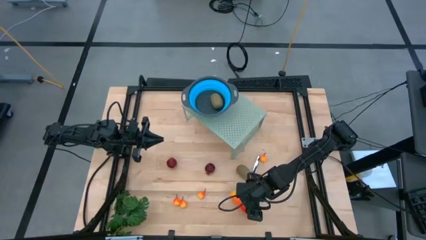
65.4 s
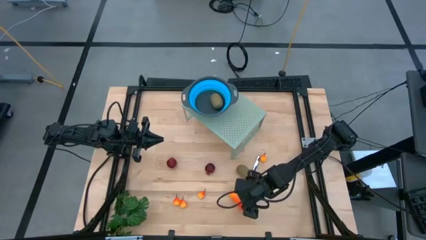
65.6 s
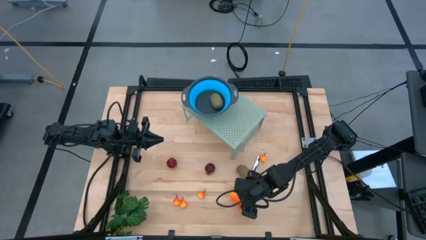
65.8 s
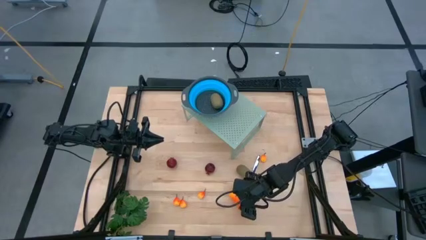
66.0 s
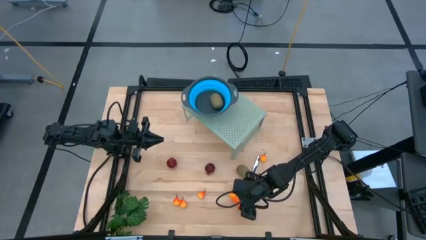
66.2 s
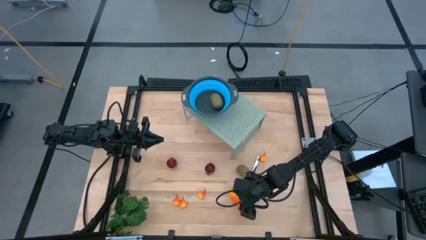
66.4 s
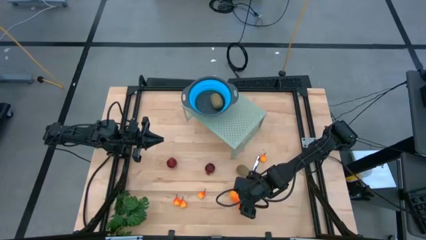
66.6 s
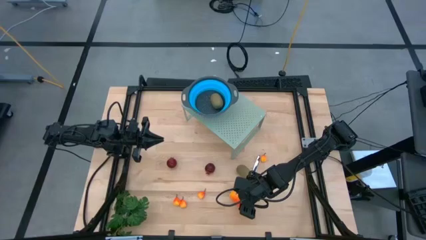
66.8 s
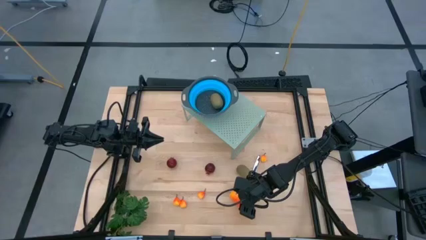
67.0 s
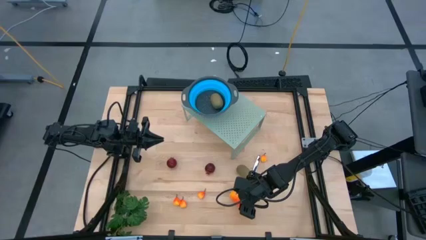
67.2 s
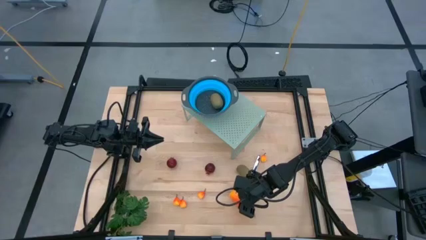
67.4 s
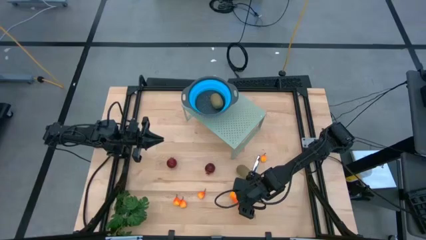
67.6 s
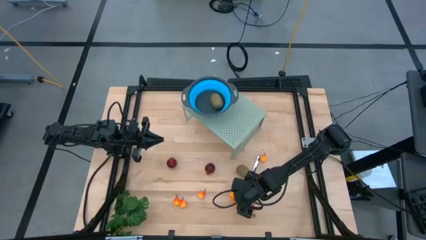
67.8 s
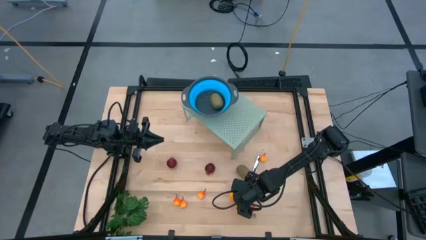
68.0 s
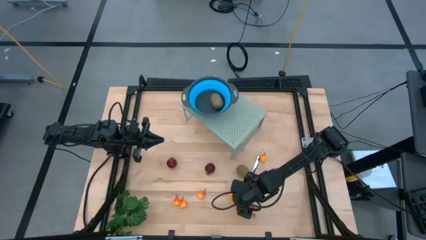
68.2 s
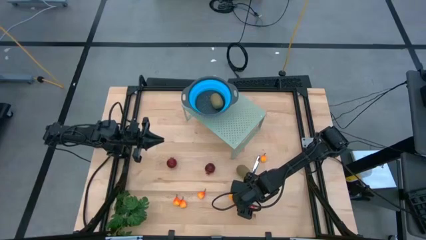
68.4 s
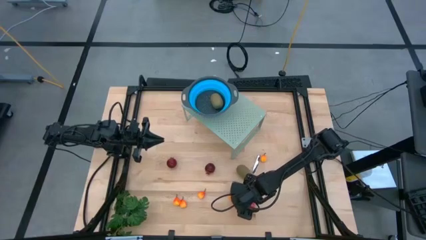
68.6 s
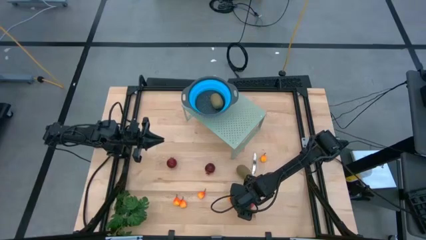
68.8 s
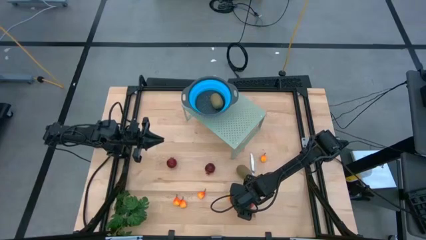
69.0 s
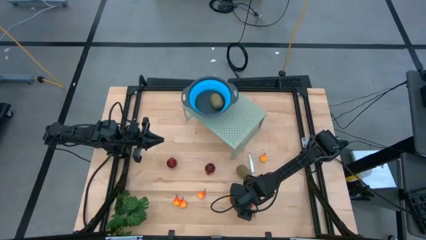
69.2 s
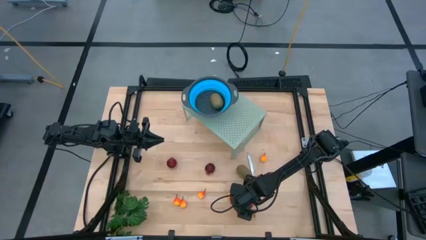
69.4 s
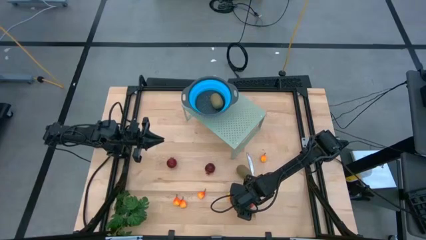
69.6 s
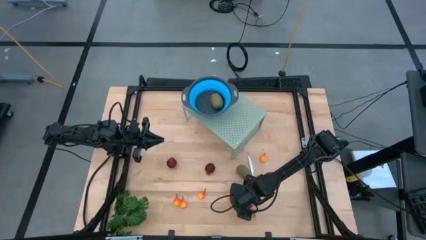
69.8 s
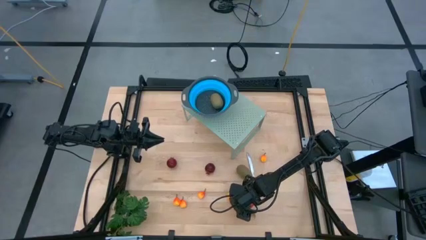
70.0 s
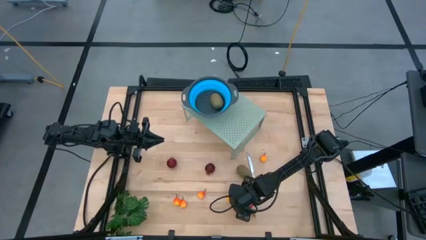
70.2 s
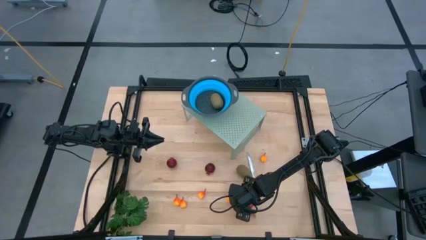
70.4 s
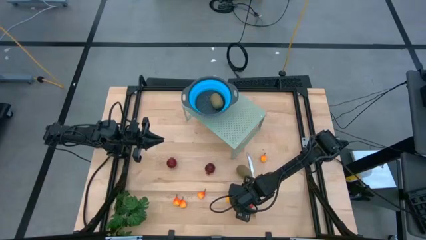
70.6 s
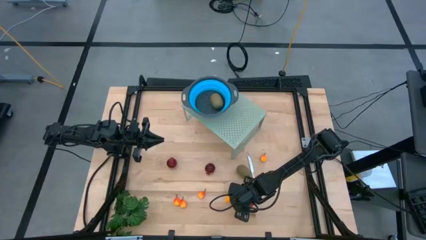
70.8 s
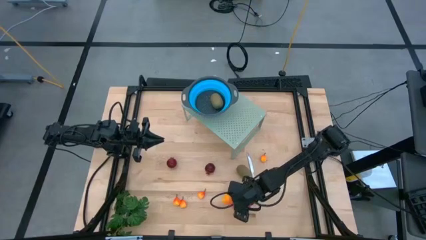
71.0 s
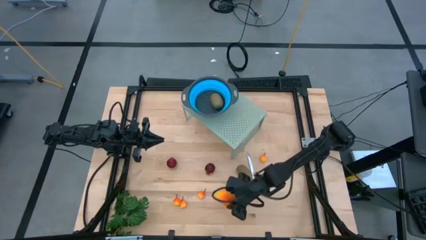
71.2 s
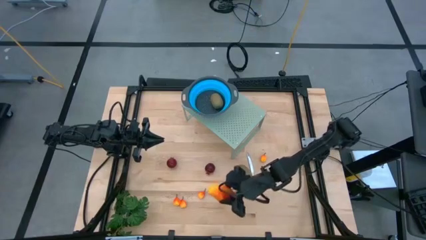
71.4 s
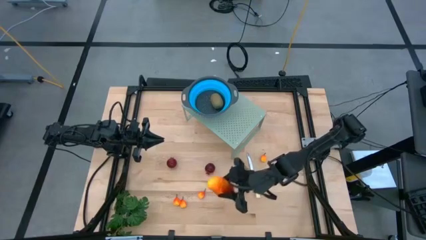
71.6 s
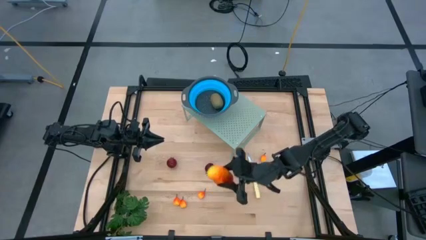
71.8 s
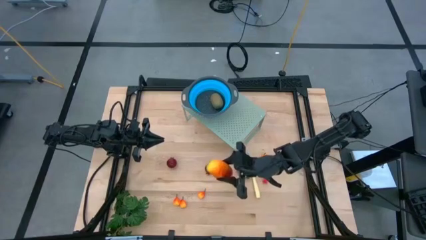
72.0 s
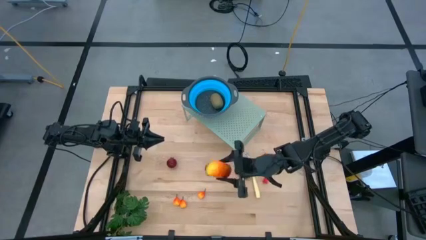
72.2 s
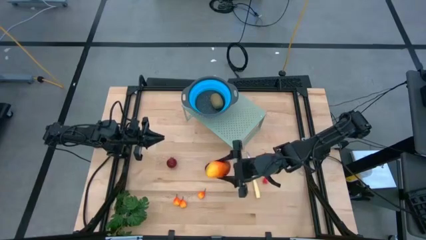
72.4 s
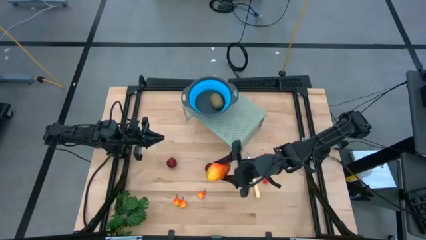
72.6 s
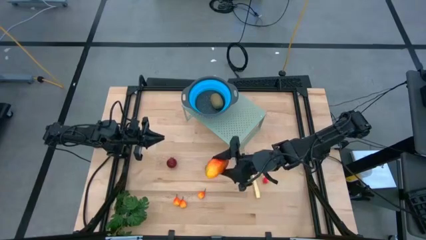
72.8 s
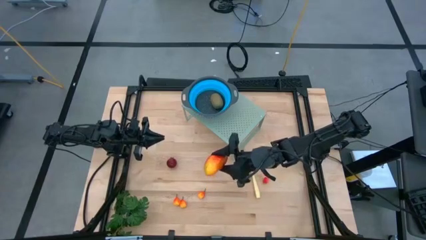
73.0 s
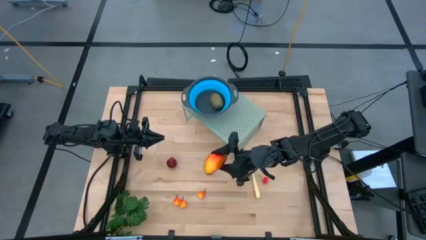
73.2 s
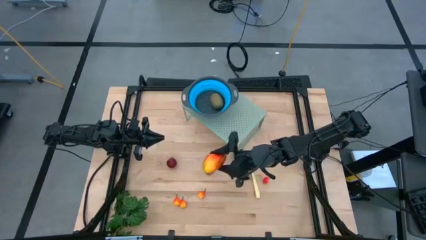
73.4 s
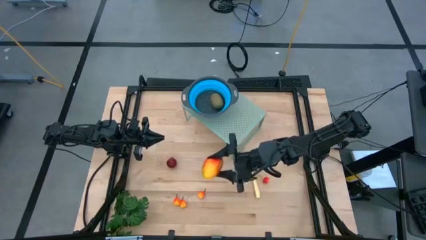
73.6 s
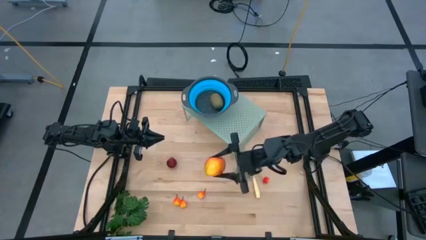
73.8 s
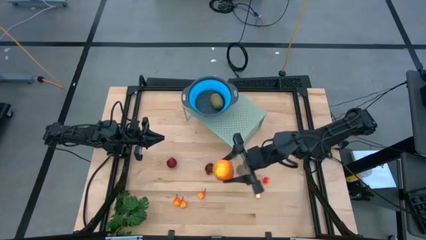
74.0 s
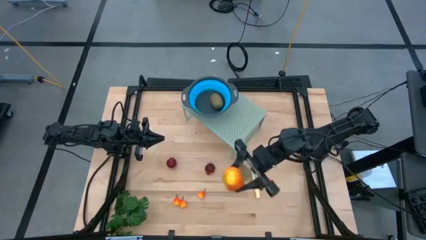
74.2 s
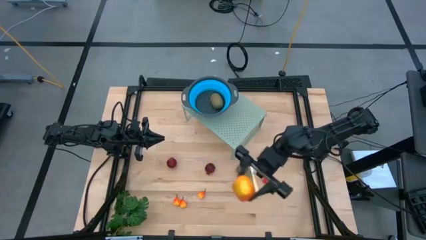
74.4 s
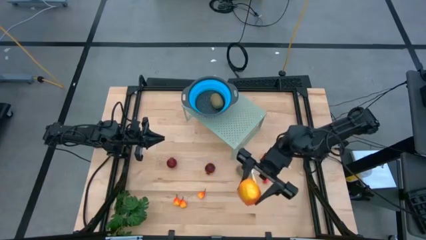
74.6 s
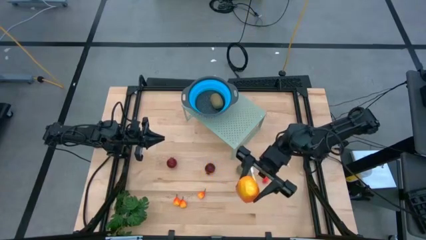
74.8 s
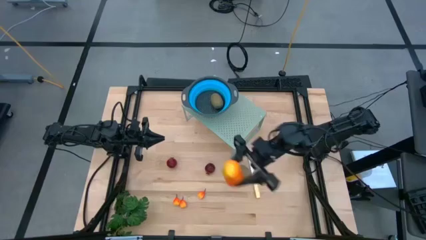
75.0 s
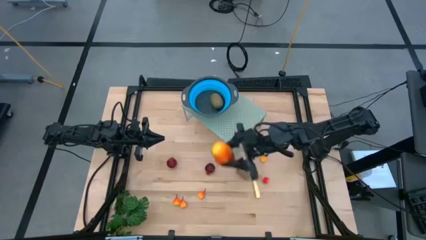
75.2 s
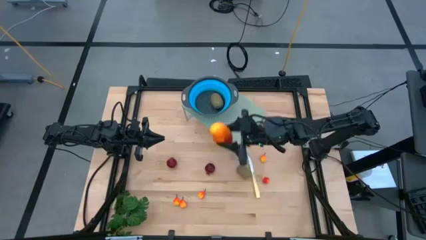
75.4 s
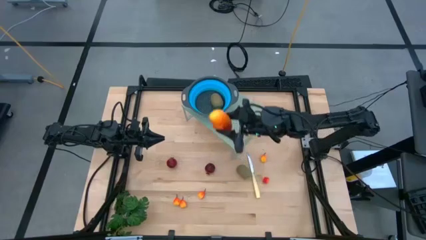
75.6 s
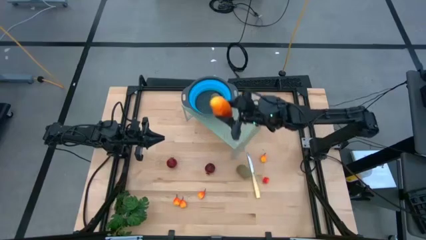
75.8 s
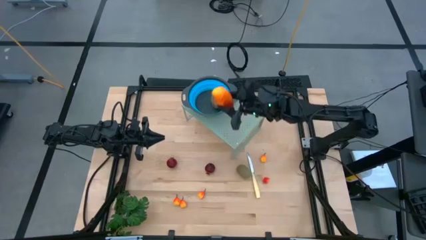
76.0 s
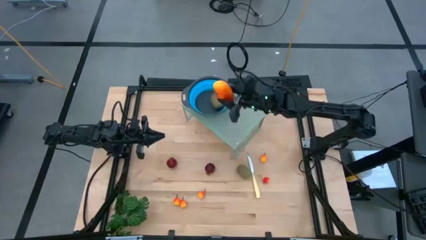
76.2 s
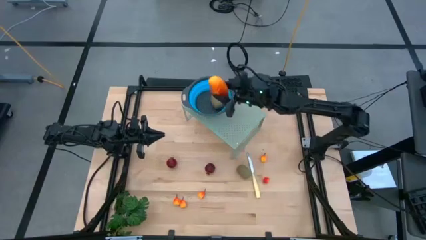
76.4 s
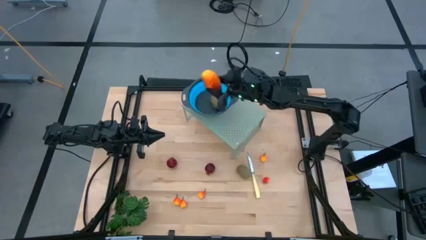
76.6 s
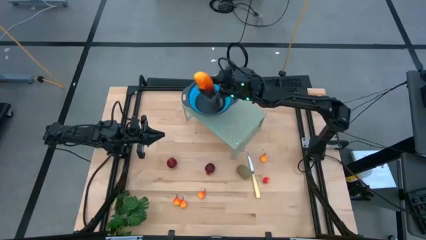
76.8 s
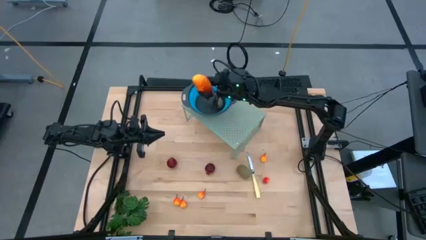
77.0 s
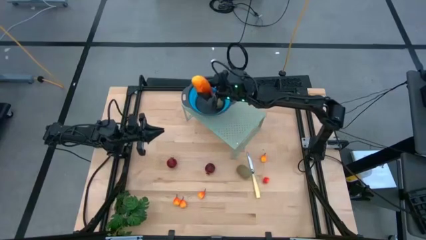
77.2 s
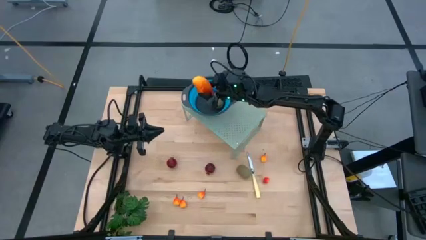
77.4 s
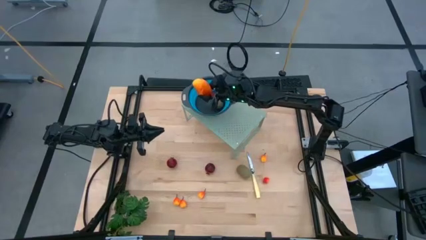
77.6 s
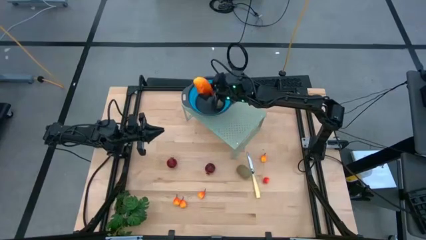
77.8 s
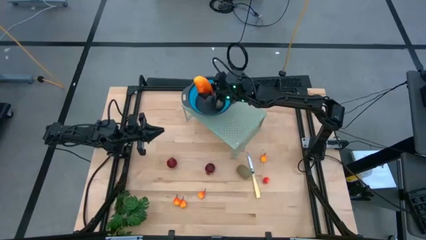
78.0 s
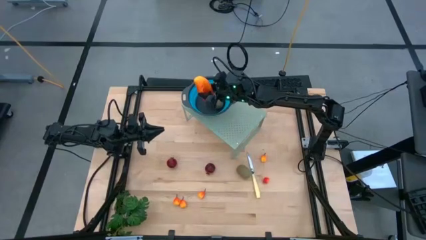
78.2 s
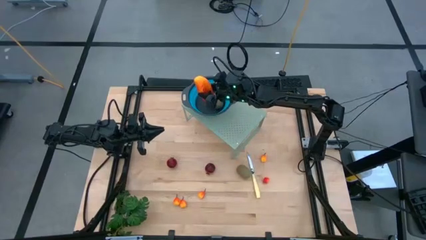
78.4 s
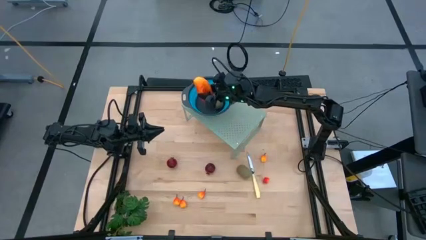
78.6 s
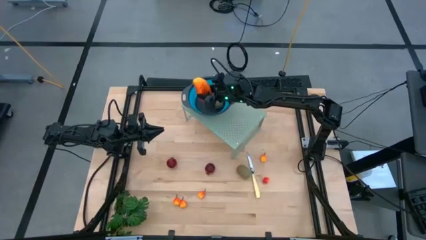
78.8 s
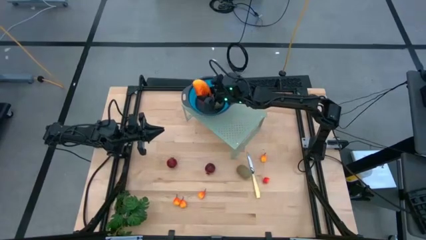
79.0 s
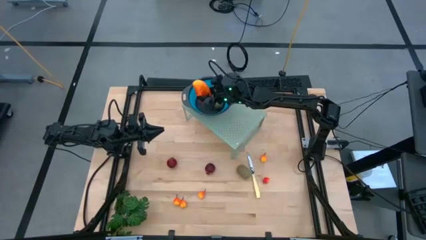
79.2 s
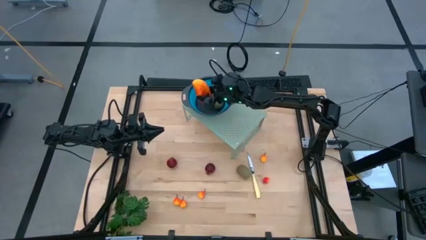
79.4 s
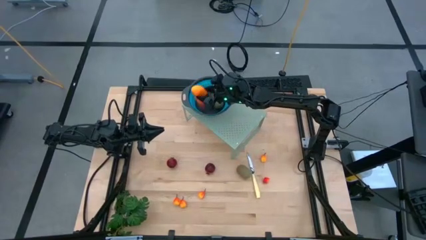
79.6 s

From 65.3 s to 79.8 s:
Task: Pick & Place Fruit
Put the mango into the blue strainer bowl on the shelf

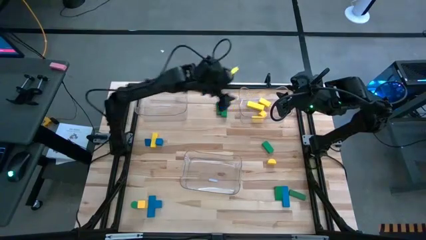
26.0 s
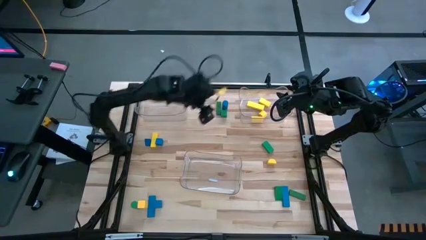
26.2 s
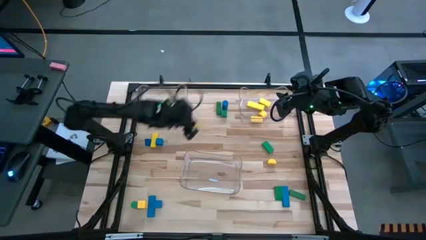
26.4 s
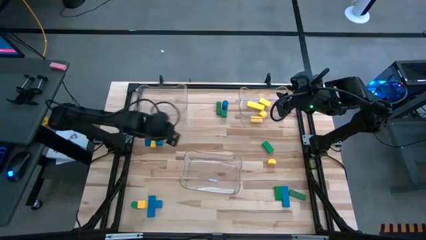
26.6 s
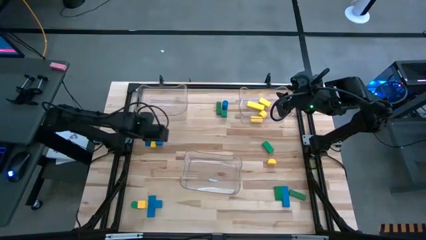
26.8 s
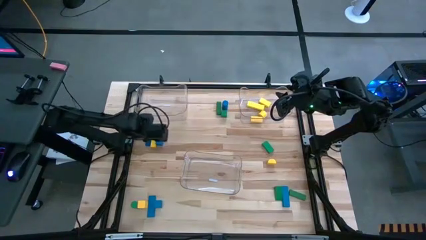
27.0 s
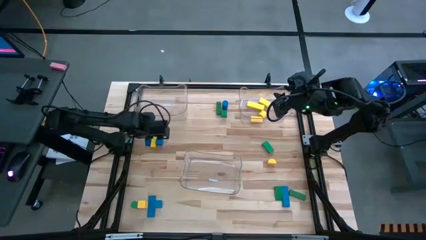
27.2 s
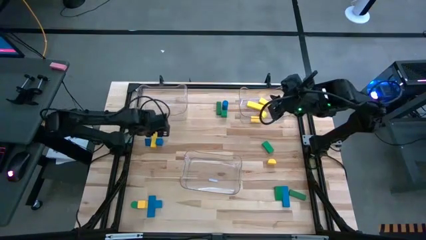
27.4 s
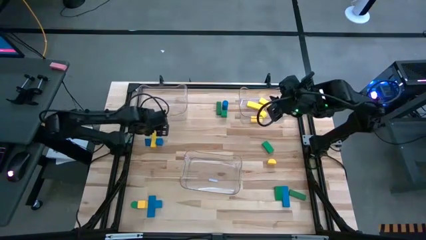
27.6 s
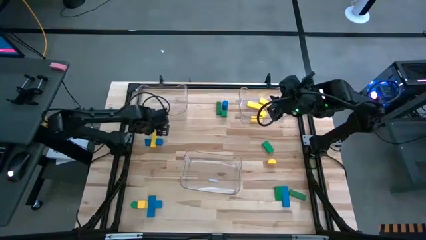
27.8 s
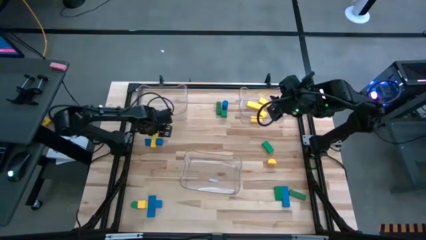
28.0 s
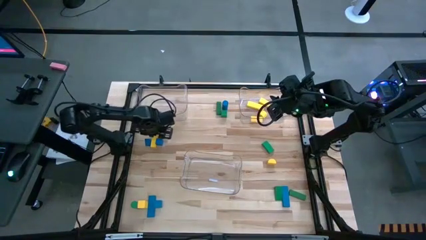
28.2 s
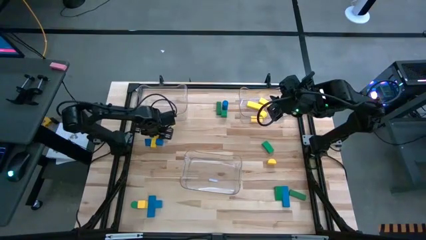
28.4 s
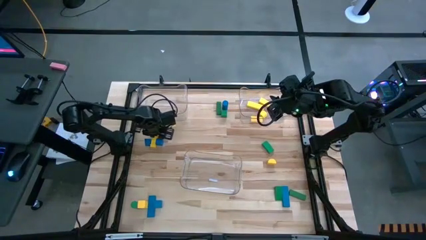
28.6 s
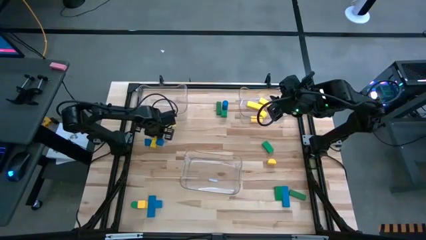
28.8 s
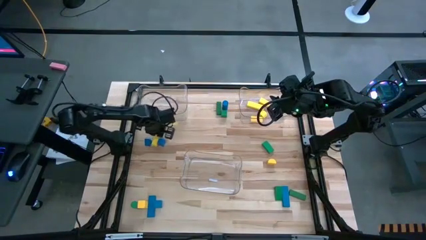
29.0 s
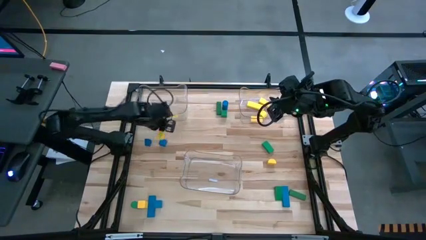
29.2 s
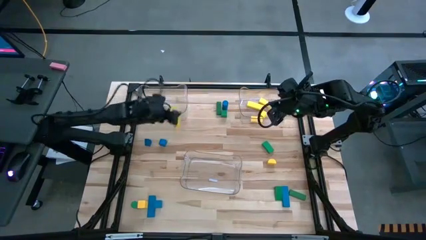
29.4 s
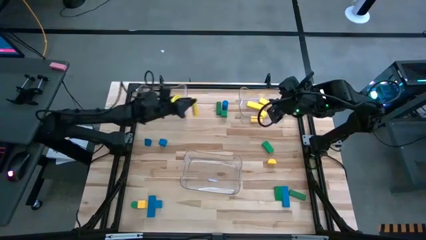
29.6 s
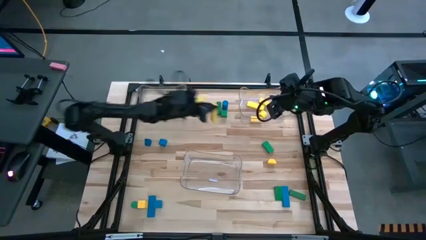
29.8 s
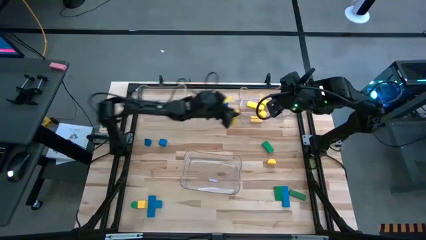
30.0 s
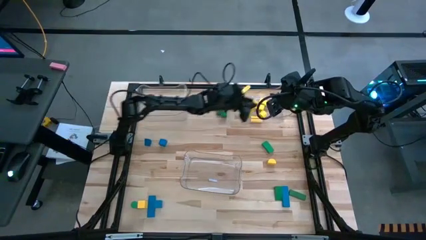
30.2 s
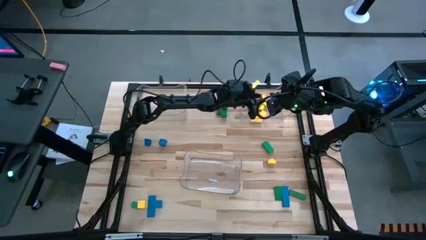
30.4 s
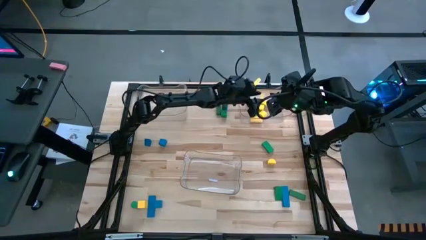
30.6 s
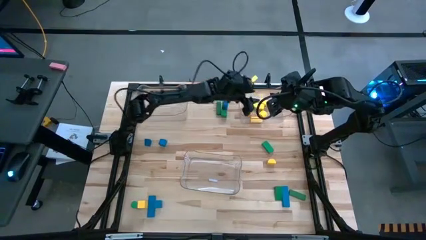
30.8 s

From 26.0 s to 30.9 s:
Task: Sort blocks
Put the yellow block into the right transparent bin
